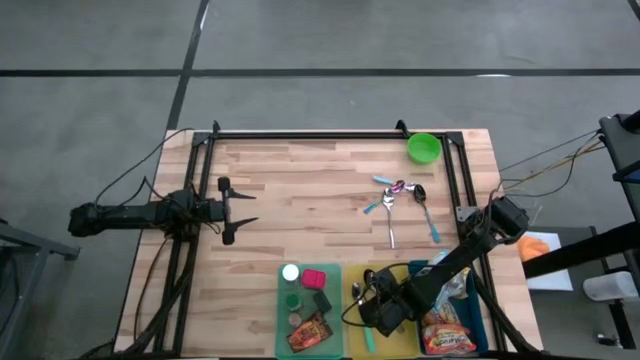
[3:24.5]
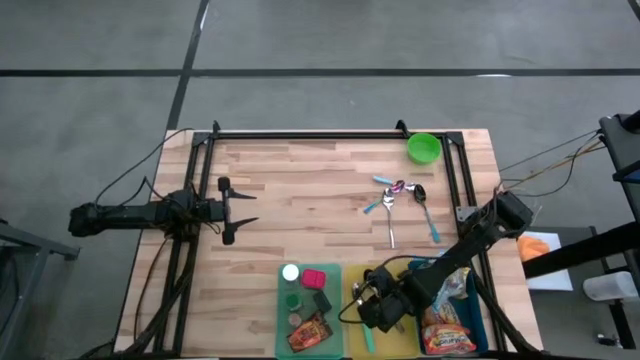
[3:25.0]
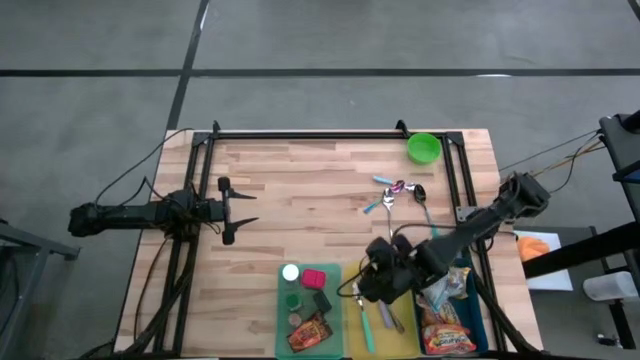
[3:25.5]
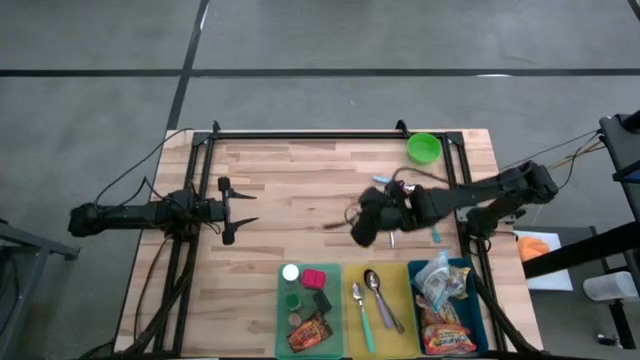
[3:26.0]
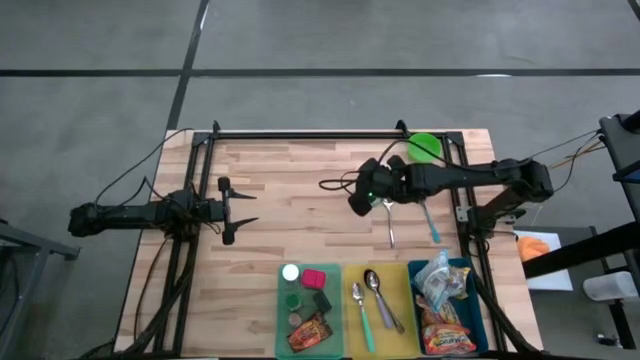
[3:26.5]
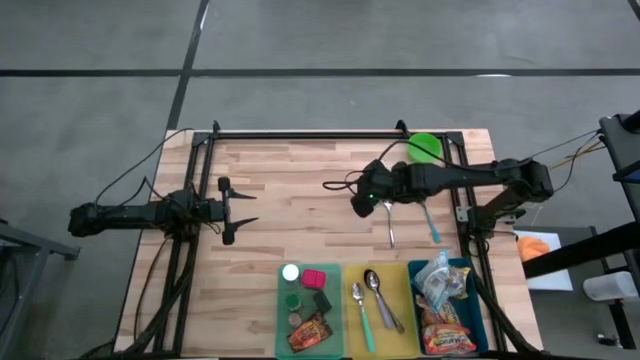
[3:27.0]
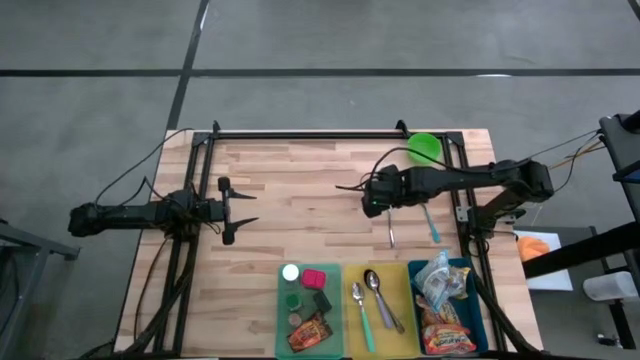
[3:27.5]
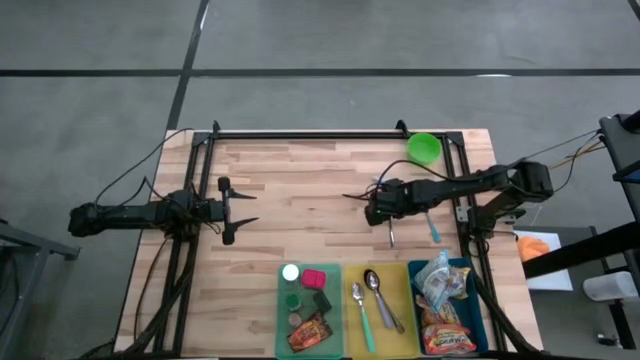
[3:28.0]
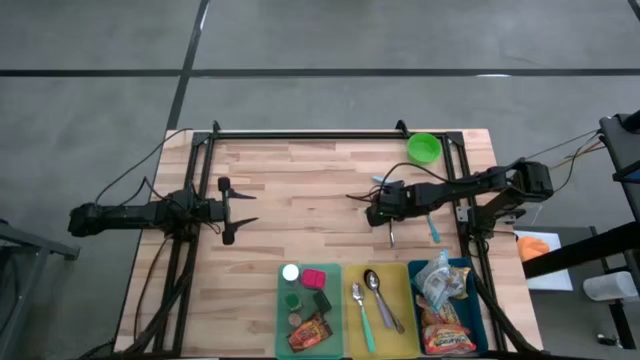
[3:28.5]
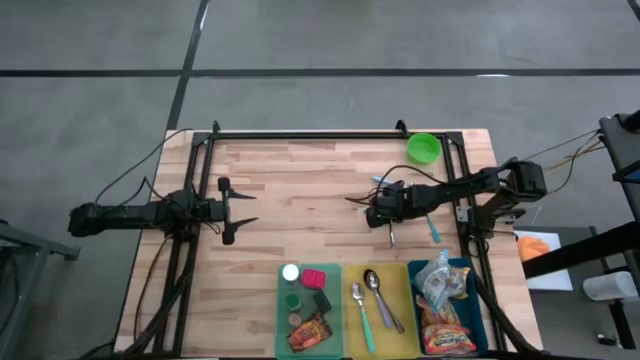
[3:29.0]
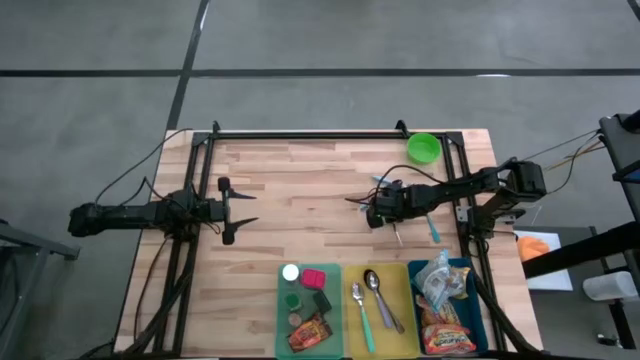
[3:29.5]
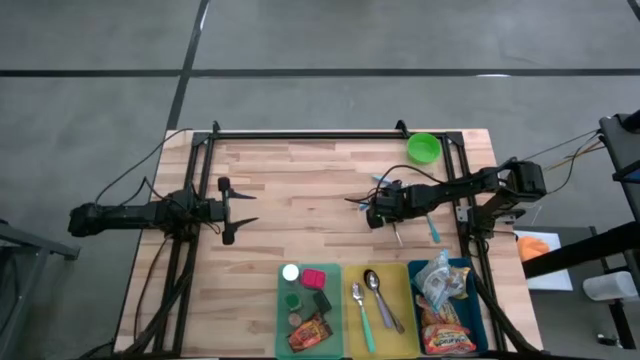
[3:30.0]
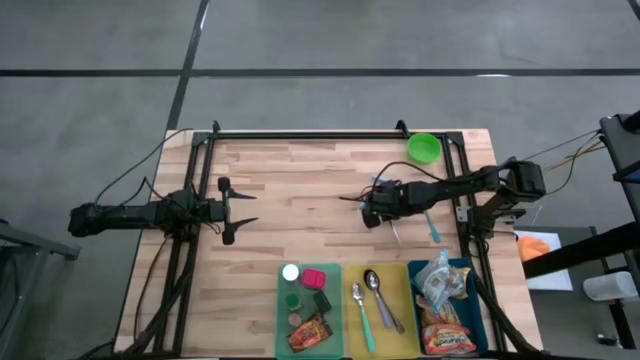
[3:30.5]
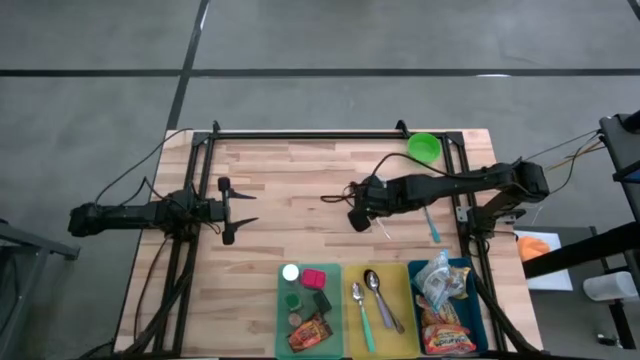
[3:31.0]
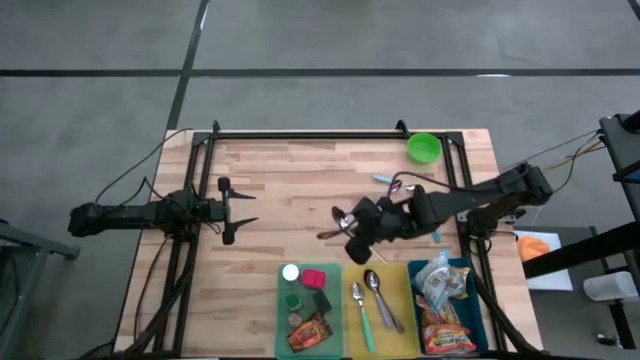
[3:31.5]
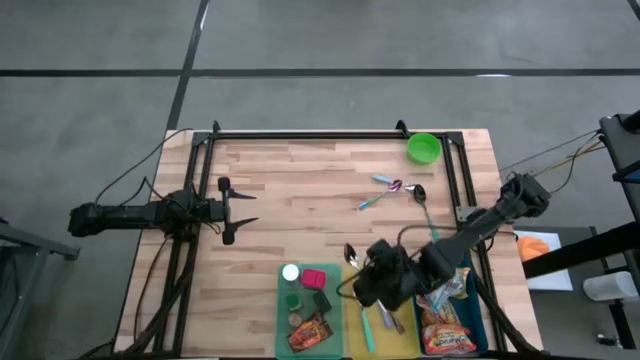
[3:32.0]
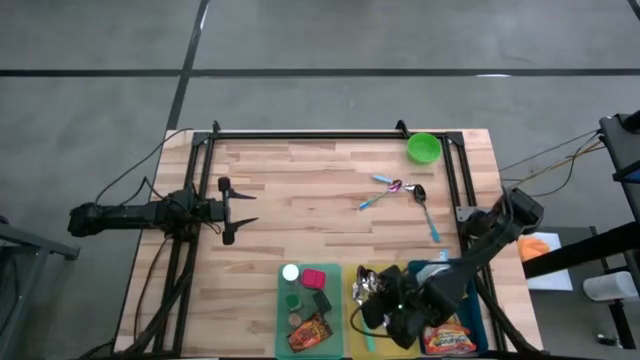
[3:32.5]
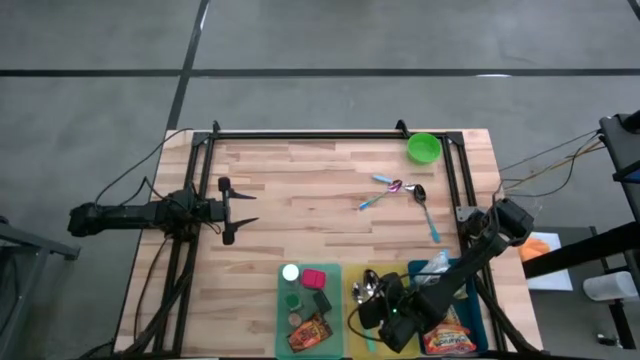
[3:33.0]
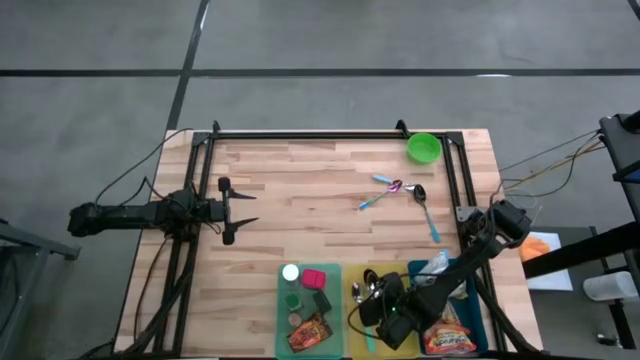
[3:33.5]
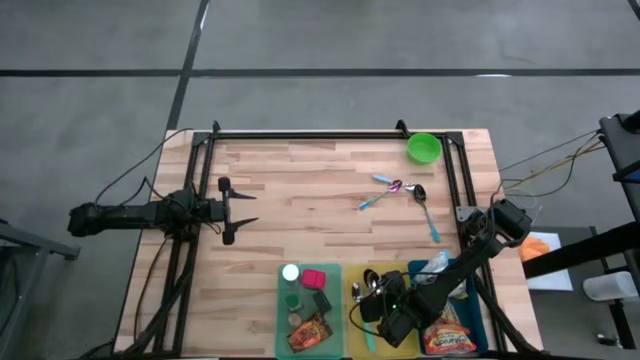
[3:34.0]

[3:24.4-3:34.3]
Put the silver spoon into the yellow bin

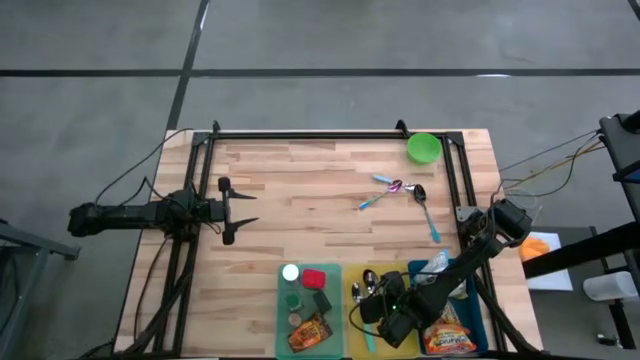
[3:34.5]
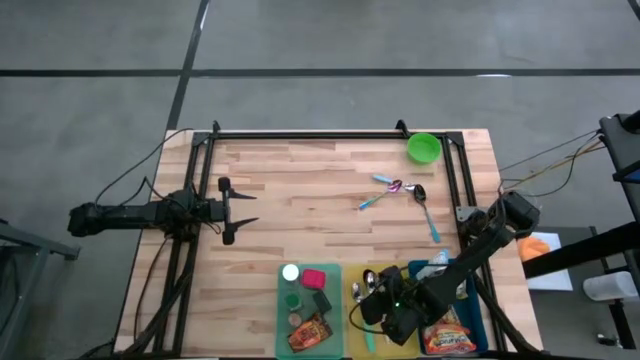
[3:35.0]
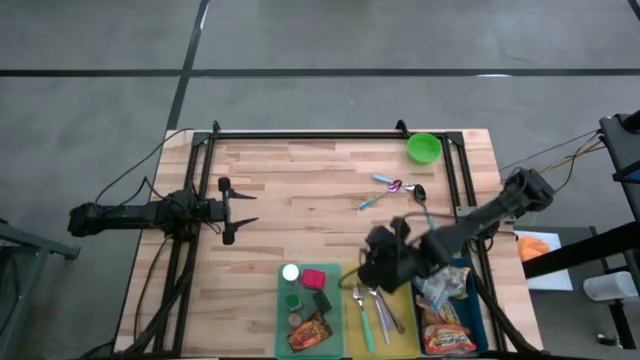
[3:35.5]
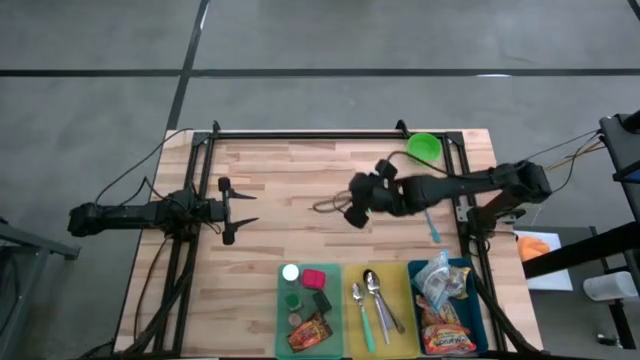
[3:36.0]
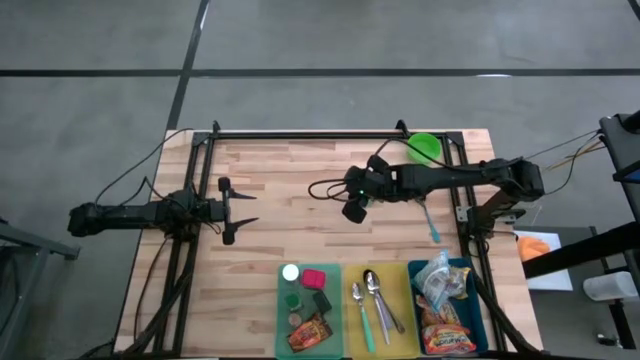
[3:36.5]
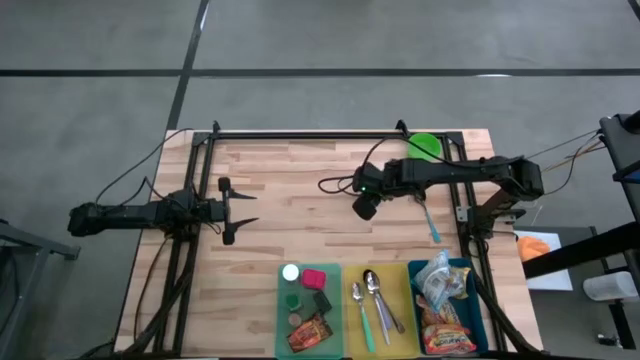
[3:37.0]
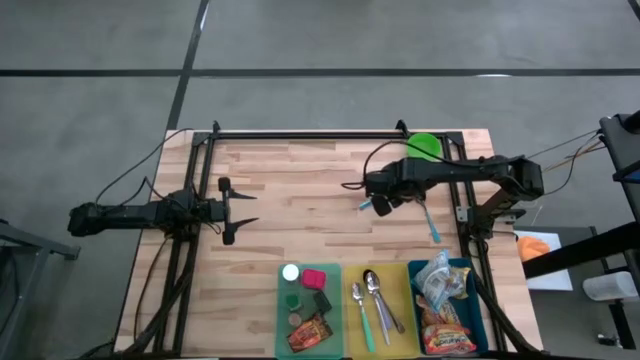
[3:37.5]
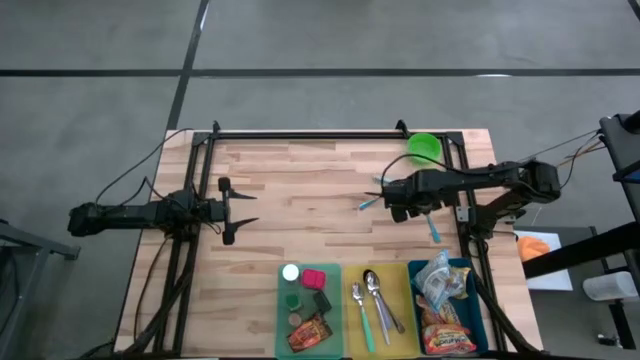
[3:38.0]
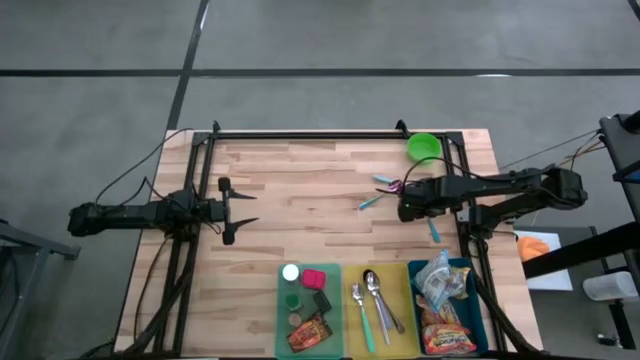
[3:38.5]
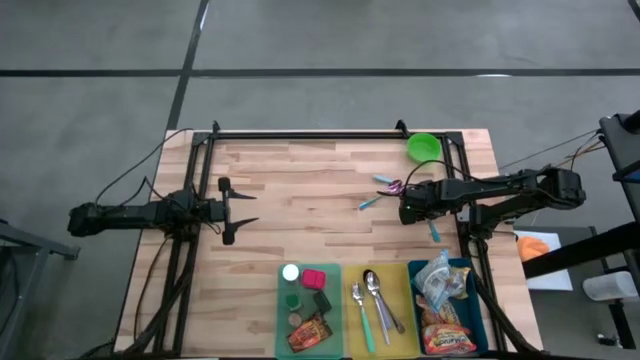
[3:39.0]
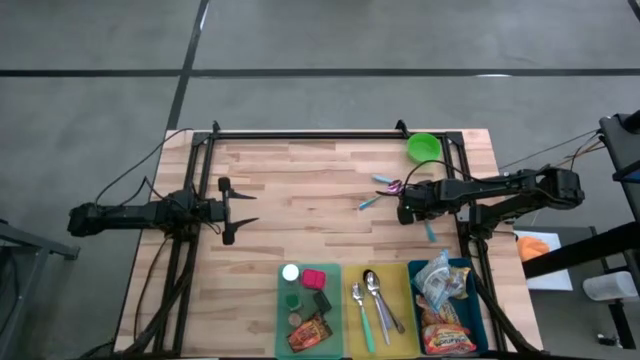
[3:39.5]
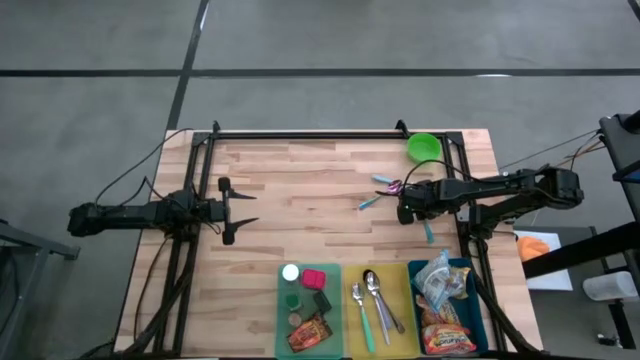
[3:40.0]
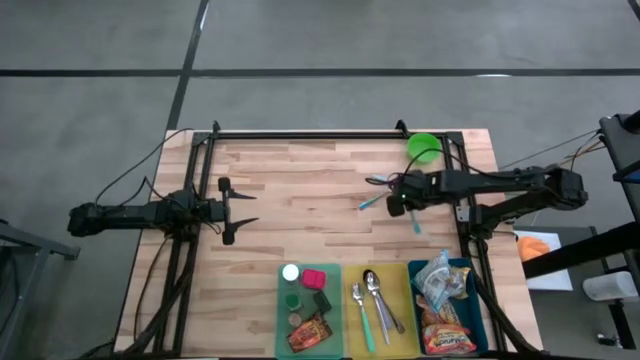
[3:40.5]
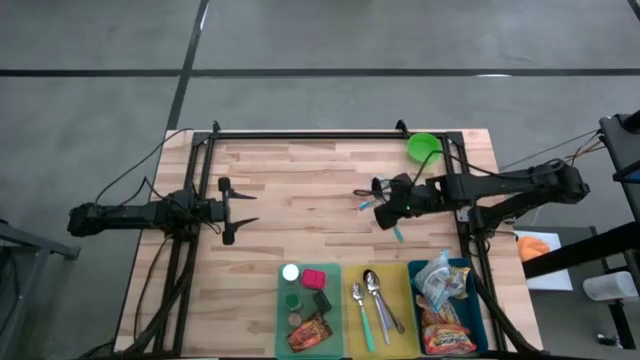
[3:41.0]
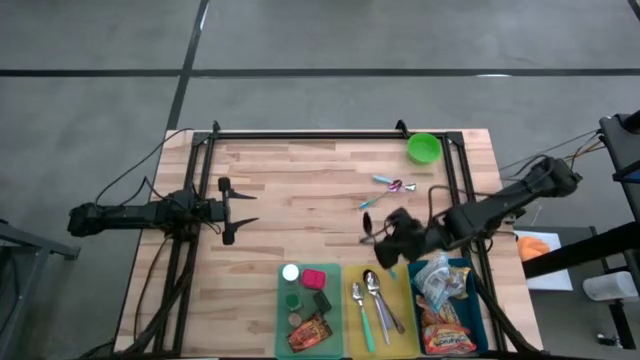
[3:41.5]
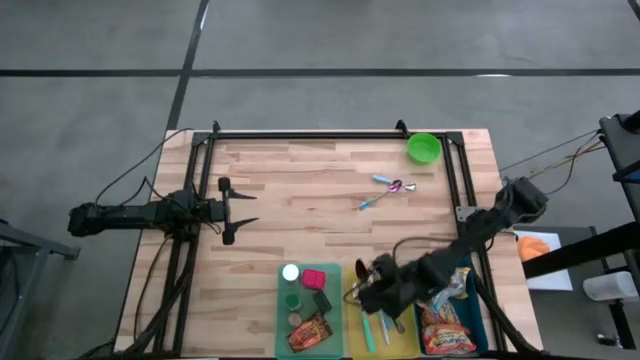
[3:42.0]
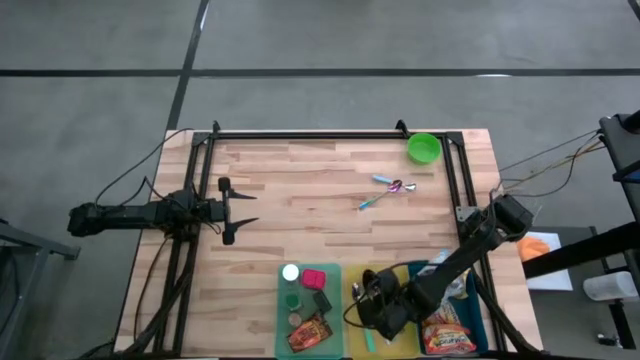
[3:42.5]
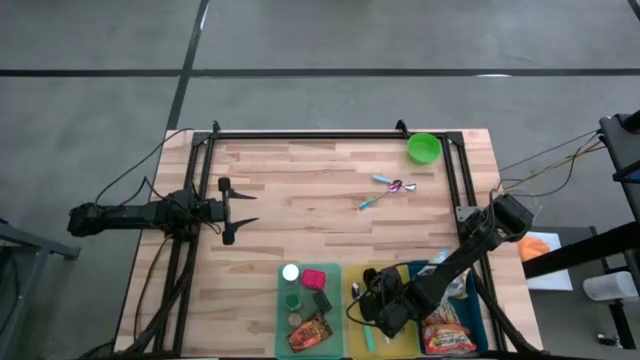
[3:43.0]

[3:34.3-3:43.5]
Put the right blue spoon into the yellow bin
